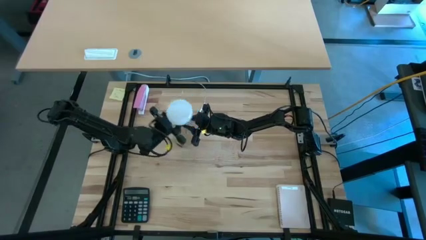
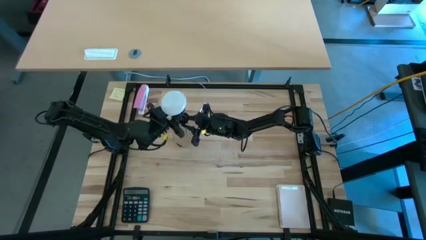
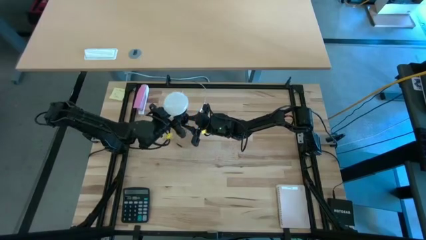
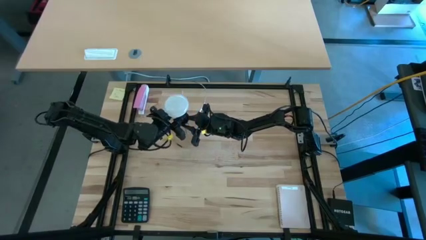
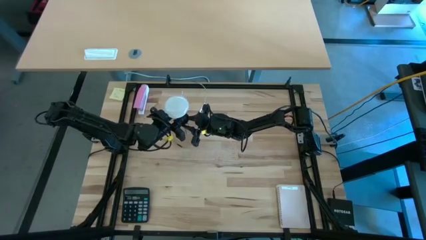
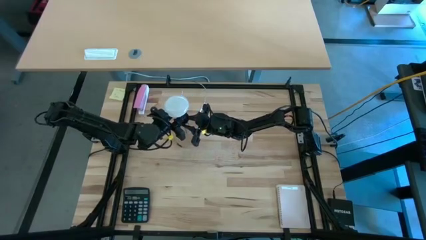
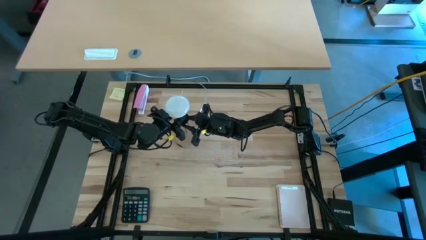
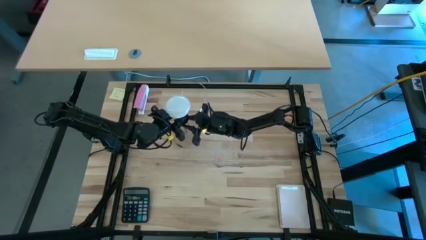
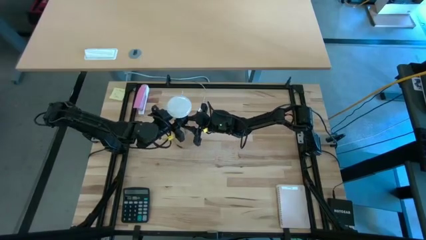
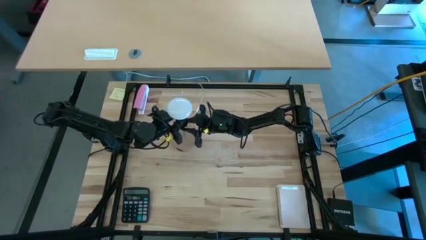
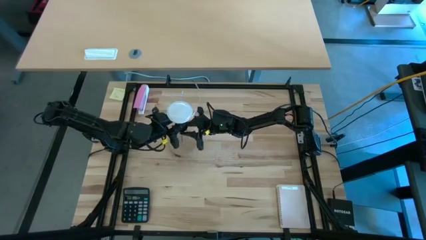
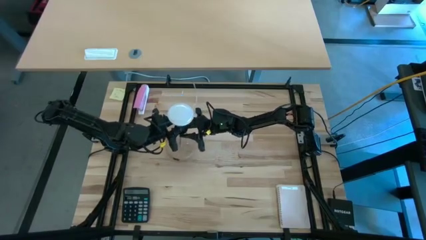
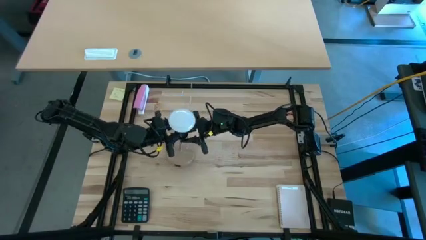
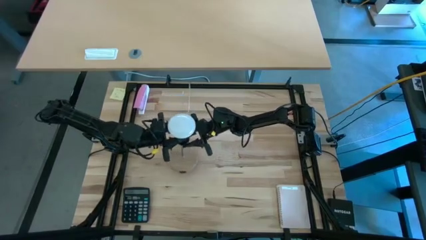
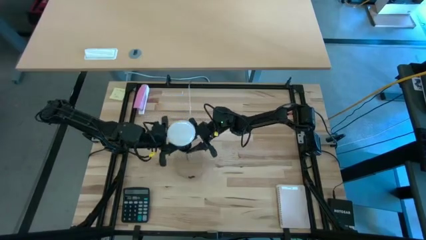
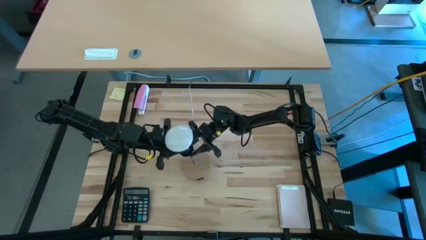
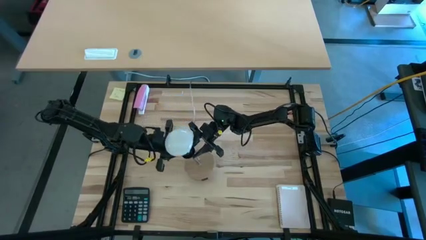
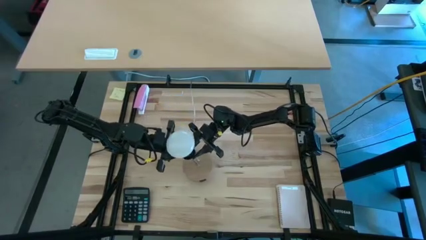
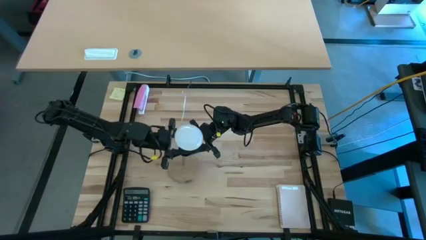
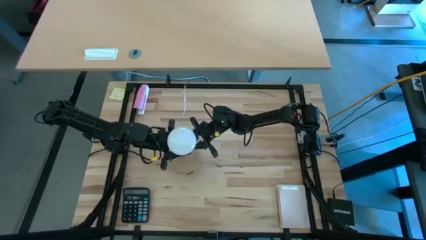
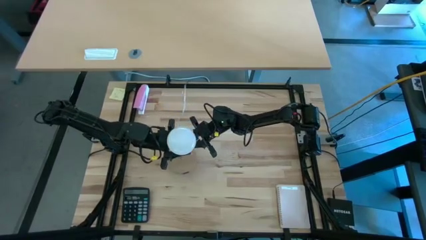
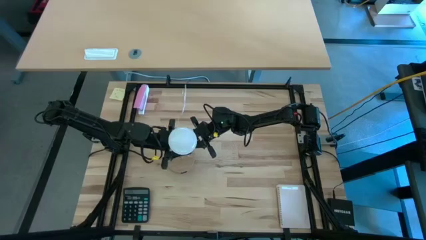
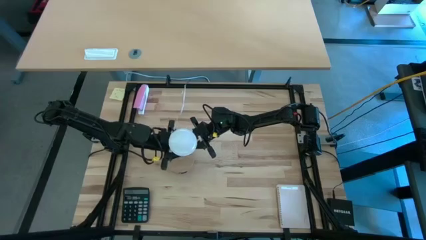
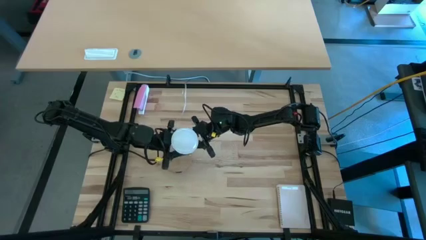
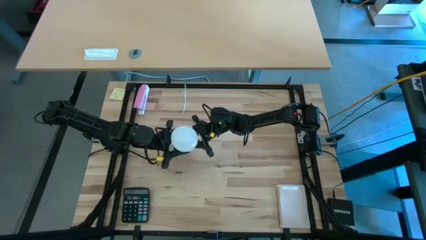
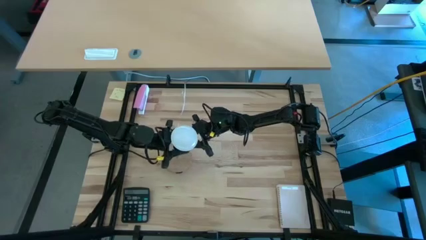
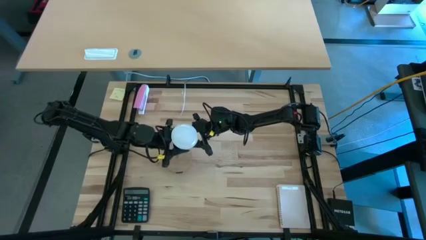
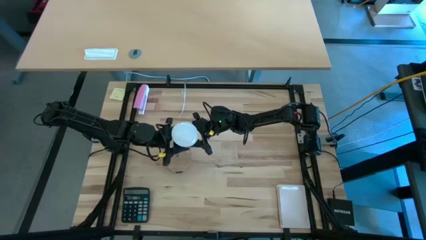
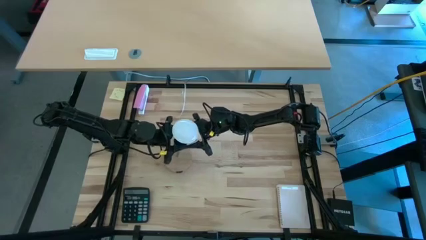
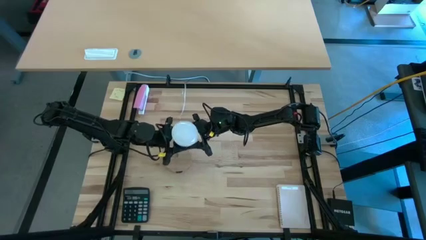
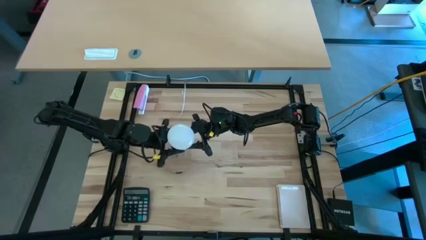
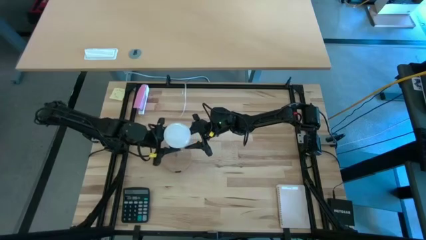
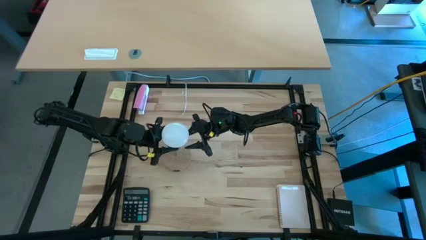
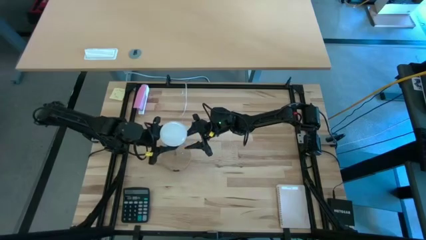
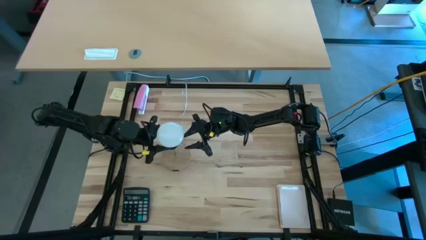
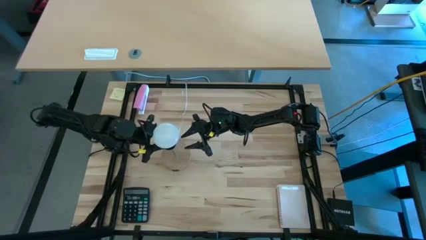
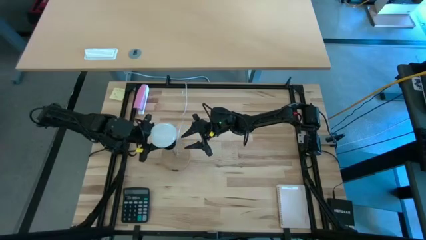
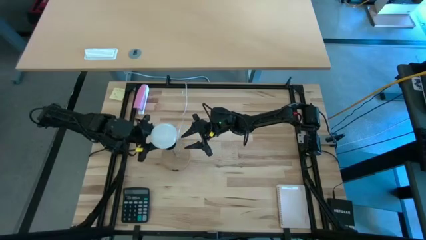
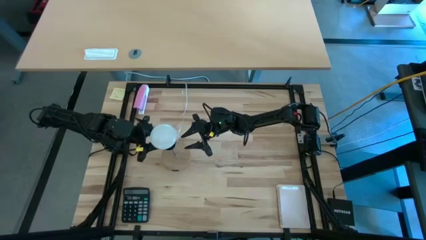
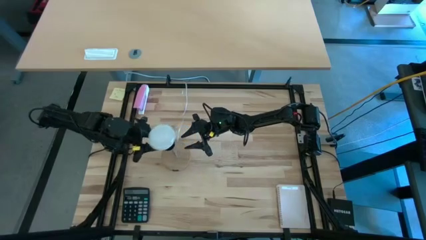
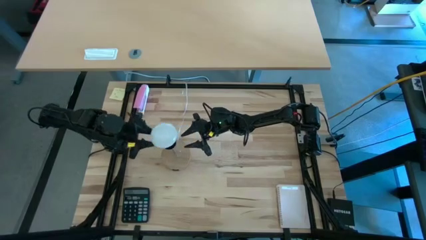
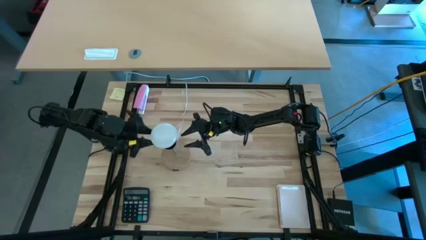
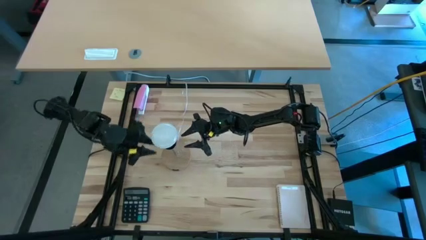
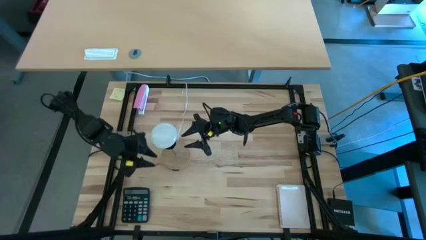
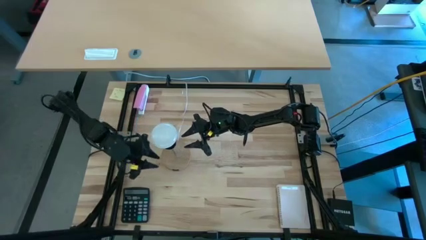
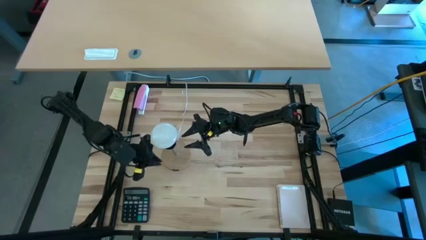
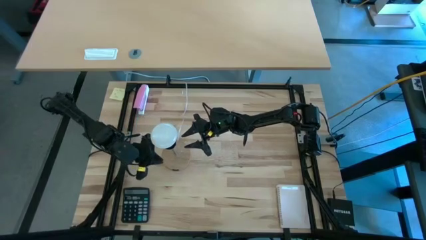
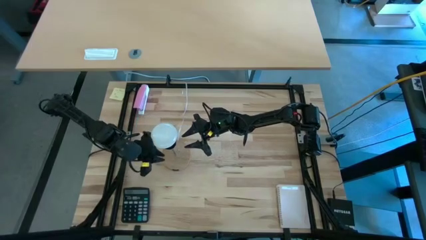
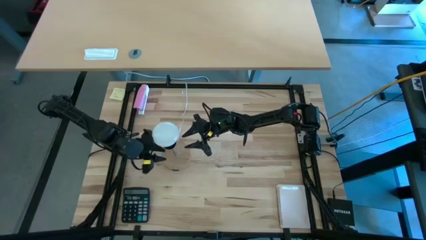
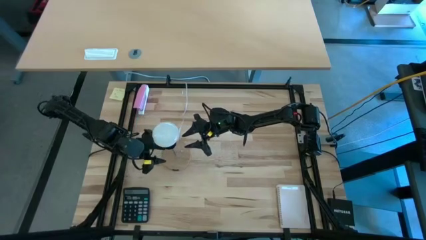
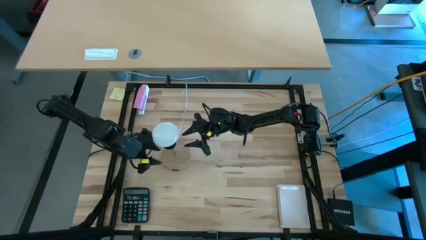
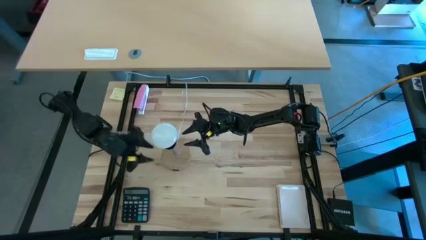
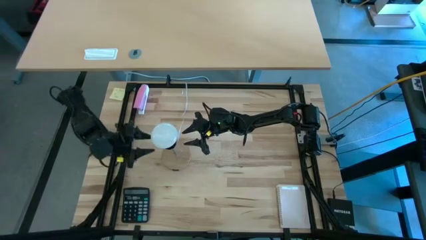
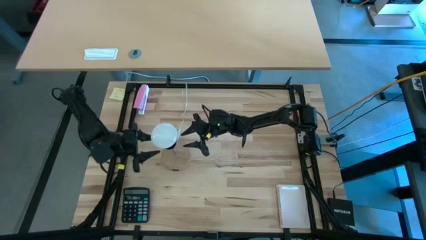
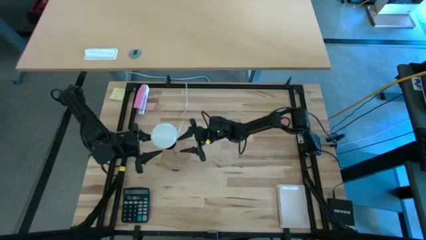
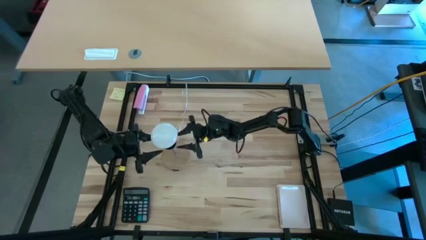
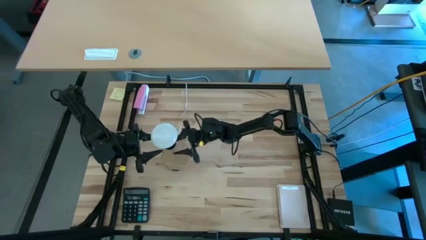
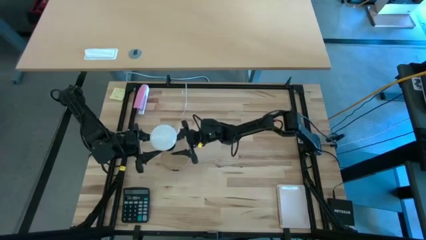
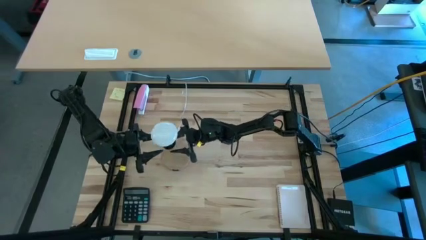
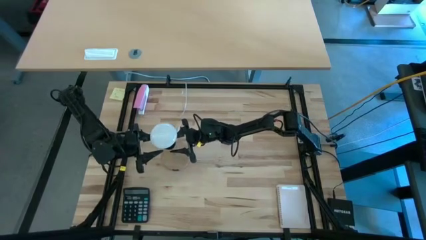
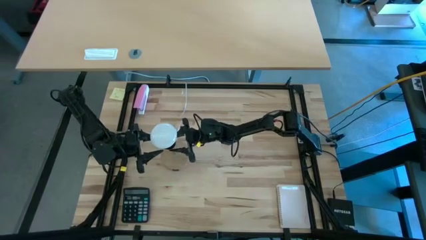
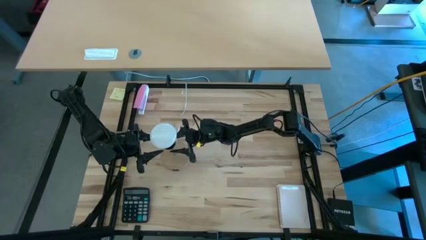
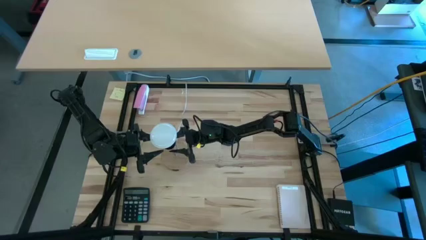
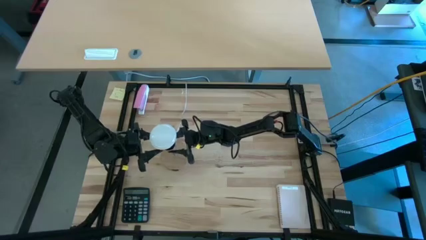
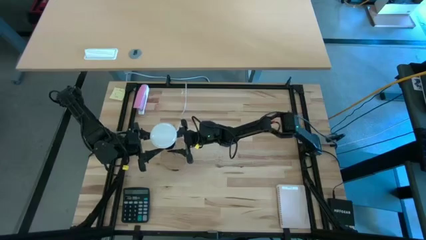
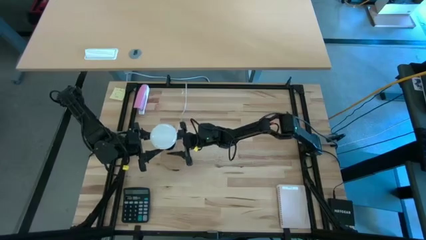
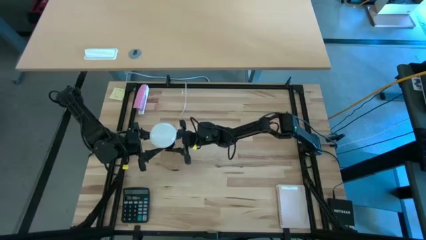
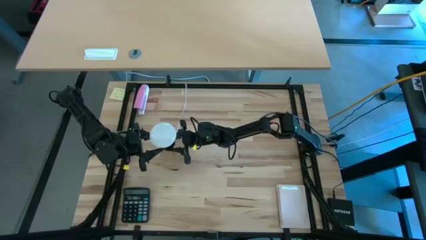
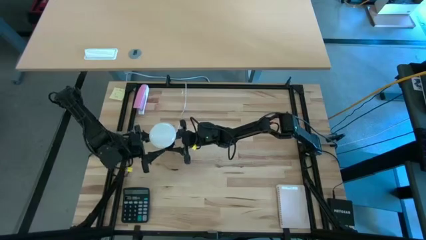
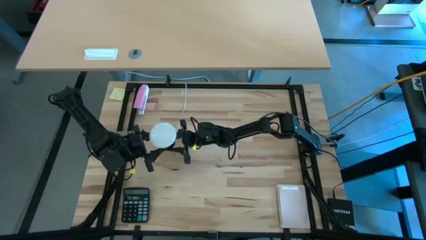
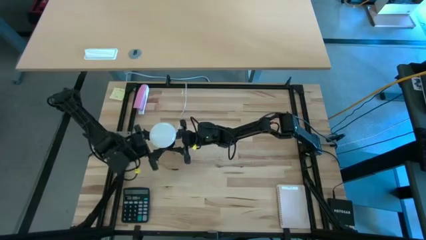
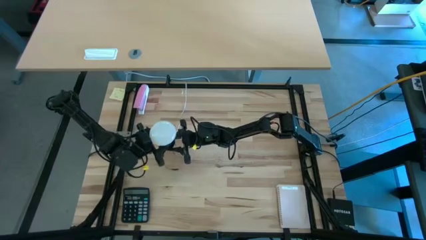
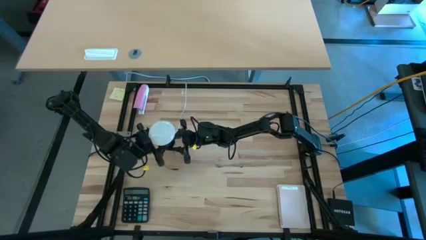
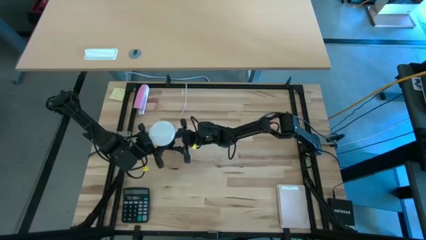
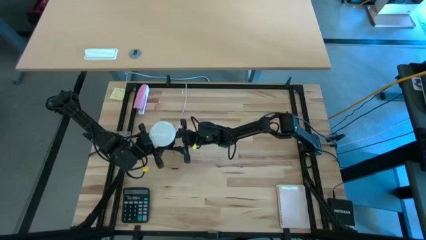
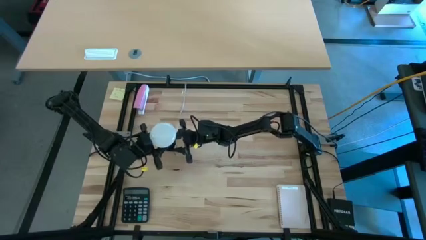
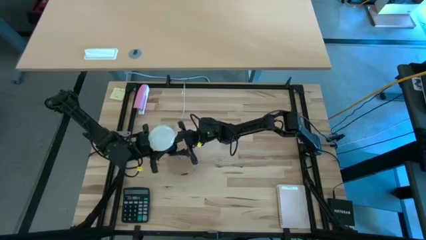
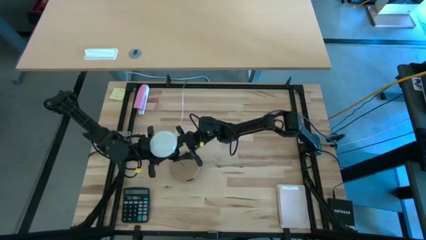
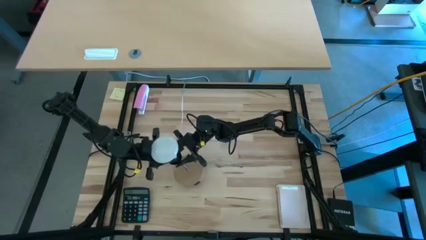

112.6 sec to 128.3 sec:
Task: Screw lightbulb
Insert the lightbulb into the desk lamp

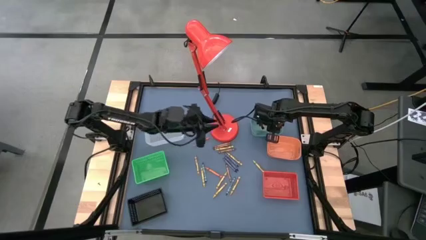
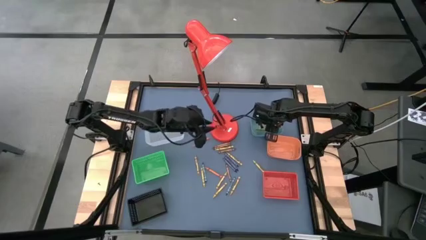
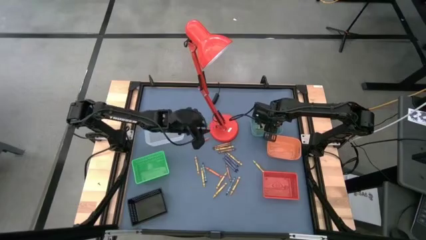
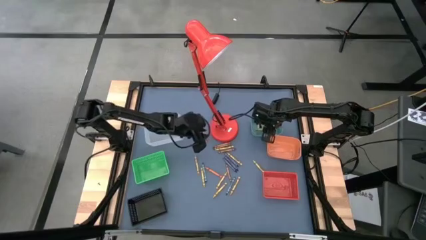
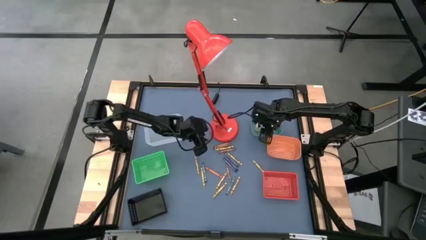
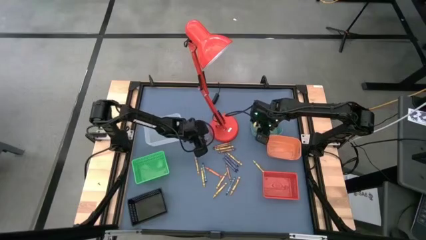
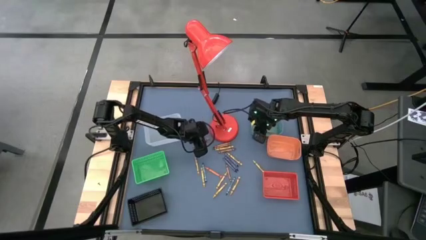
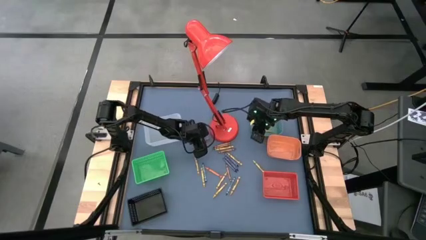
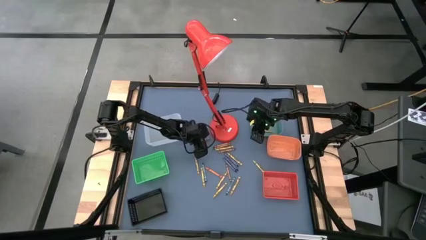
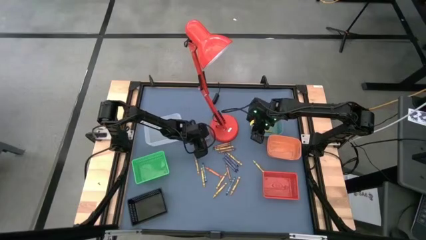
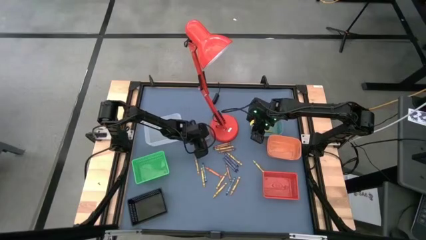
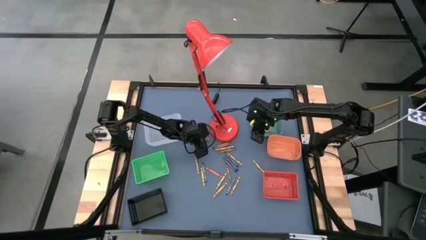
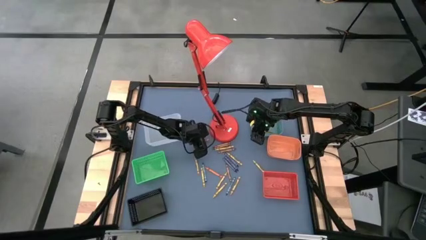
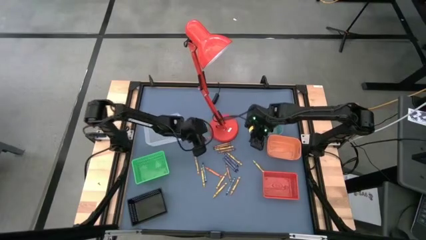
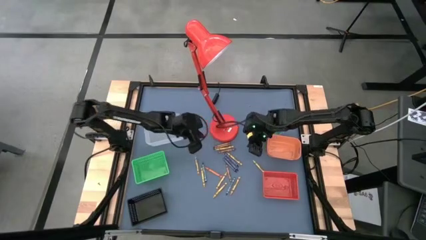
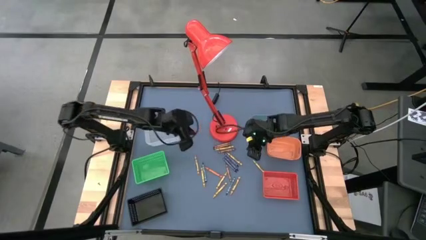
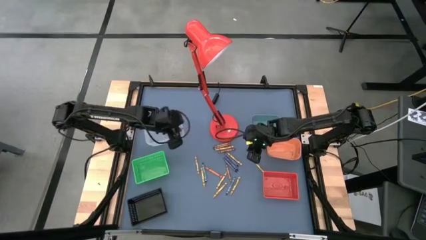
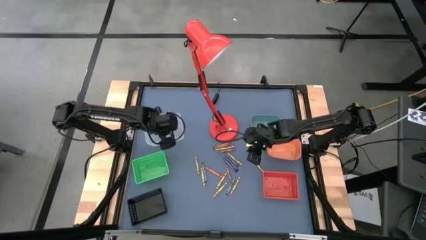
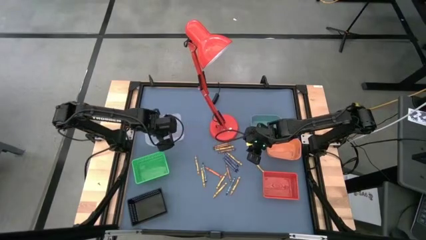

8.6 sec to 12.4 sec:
Task: Sort crayons
Put the orange crayon into the white bin
